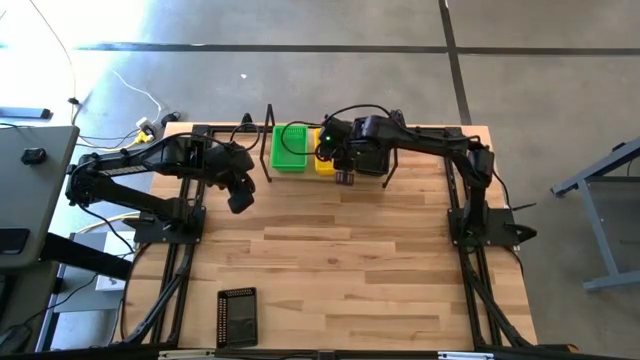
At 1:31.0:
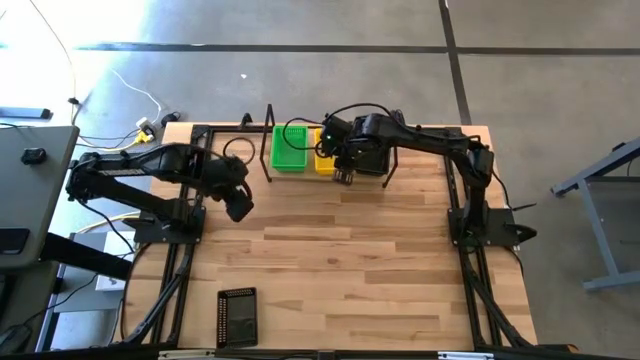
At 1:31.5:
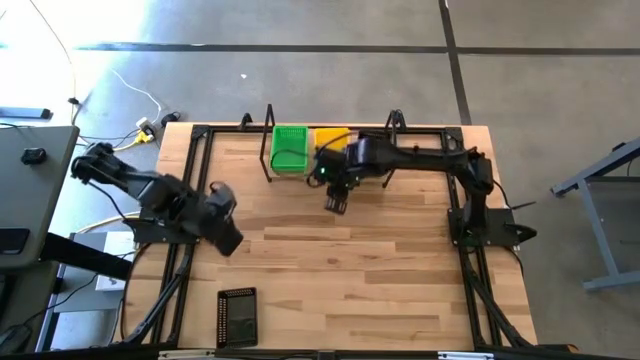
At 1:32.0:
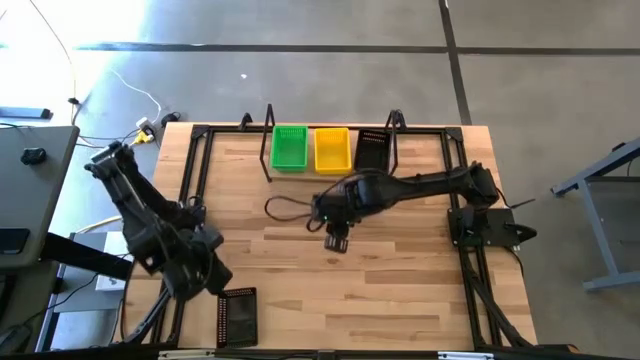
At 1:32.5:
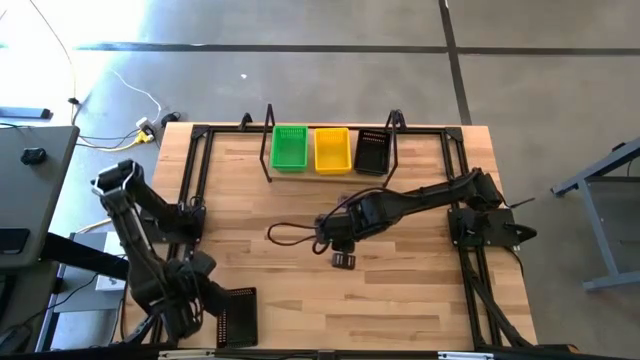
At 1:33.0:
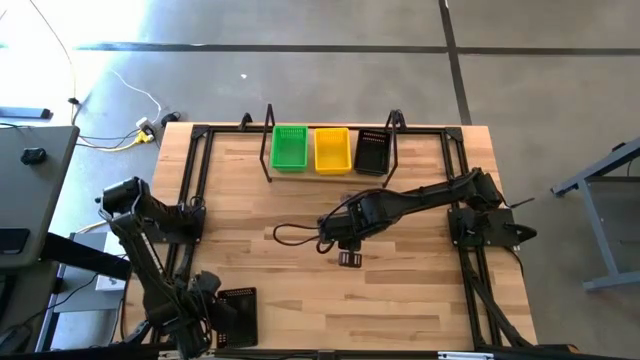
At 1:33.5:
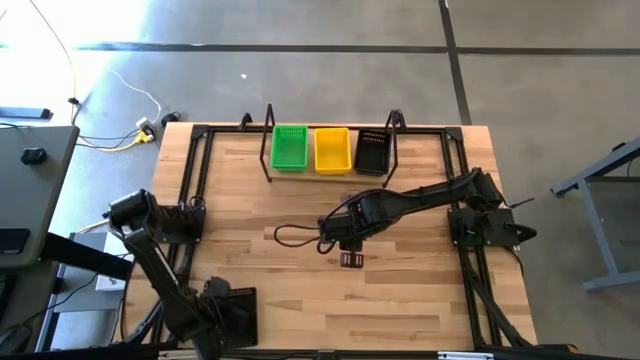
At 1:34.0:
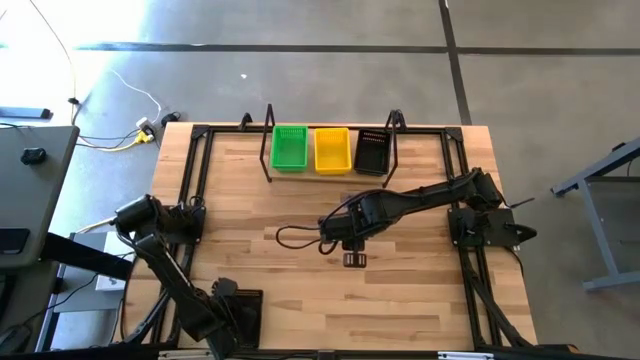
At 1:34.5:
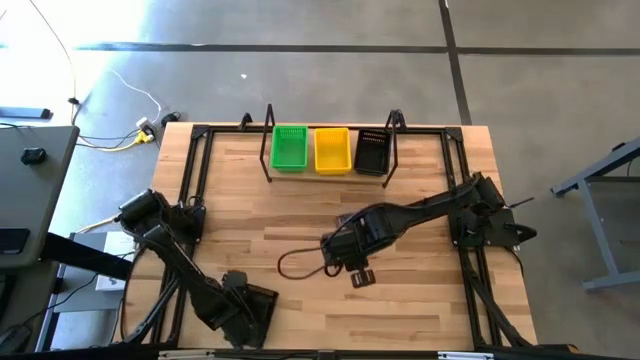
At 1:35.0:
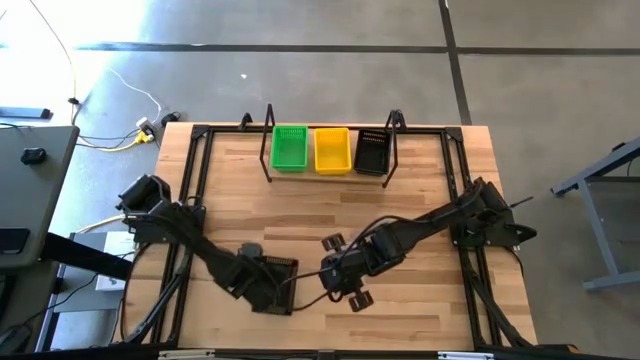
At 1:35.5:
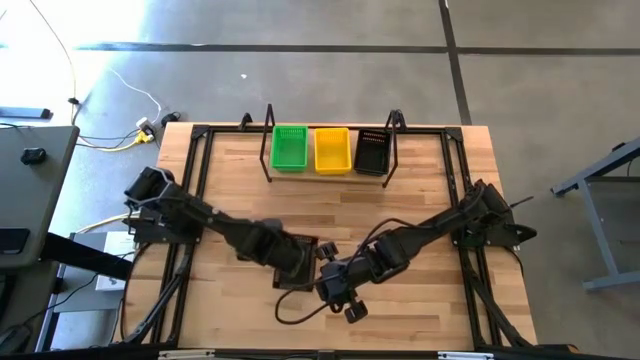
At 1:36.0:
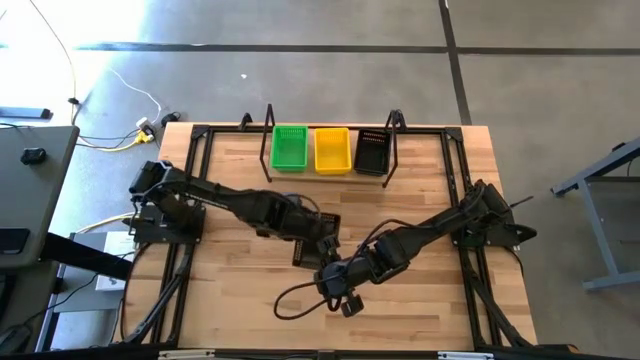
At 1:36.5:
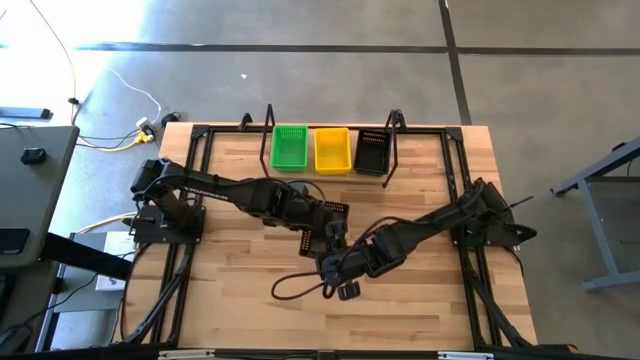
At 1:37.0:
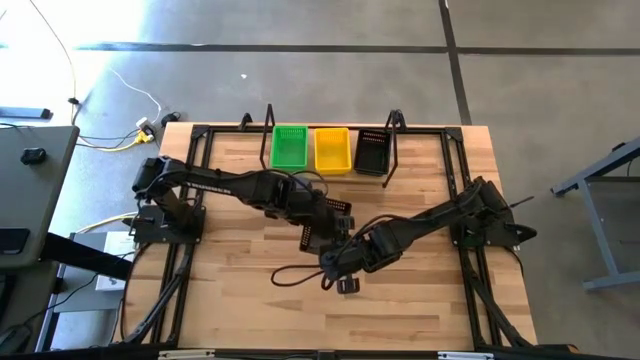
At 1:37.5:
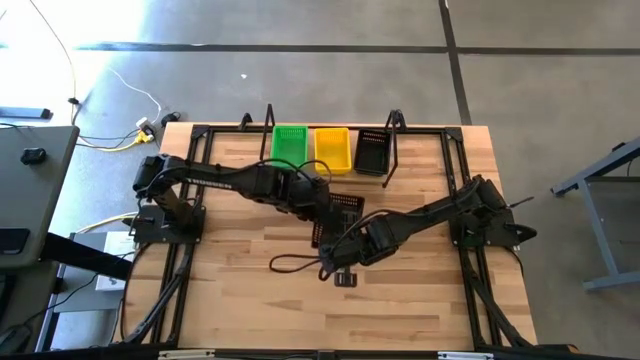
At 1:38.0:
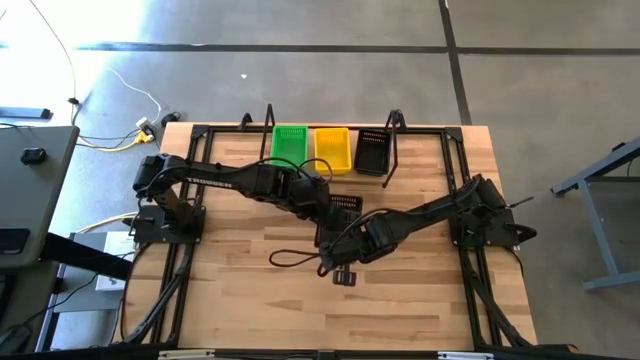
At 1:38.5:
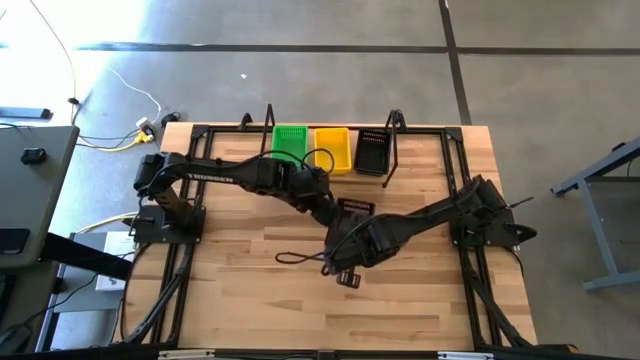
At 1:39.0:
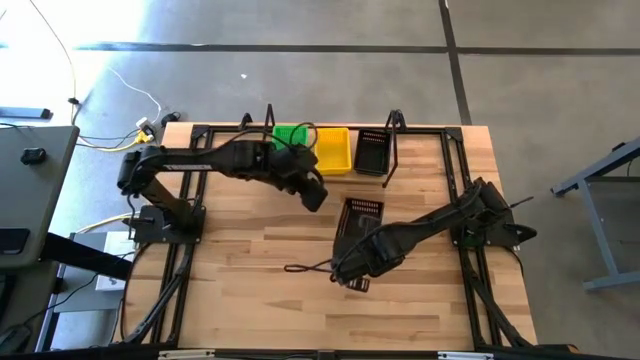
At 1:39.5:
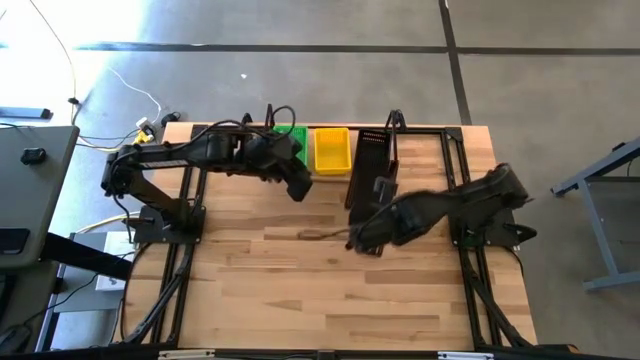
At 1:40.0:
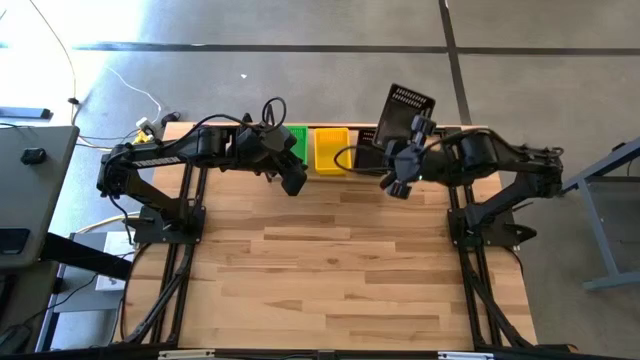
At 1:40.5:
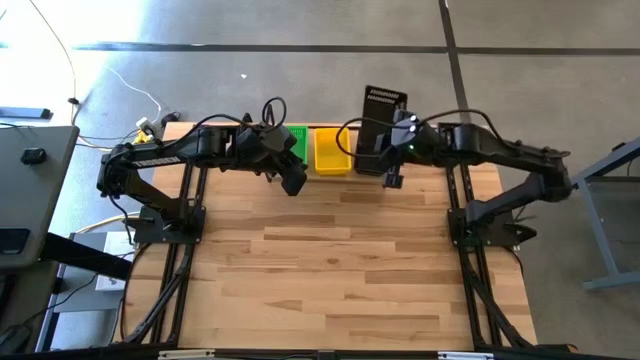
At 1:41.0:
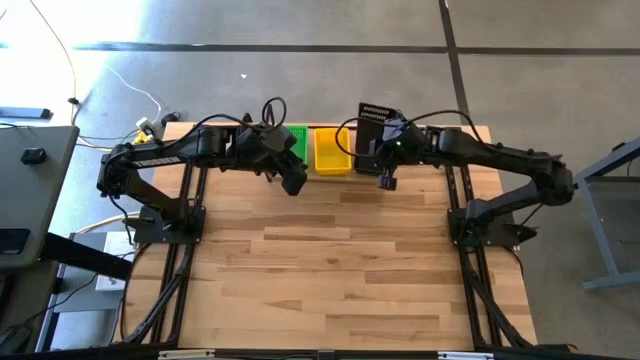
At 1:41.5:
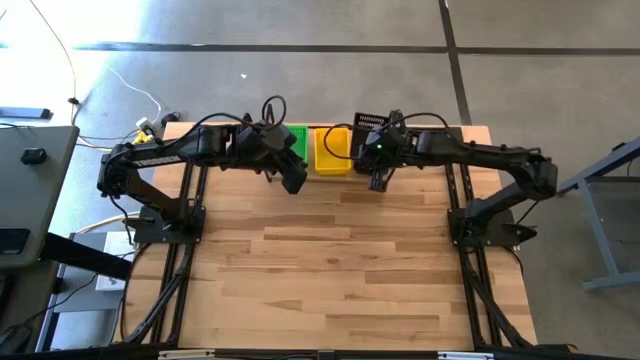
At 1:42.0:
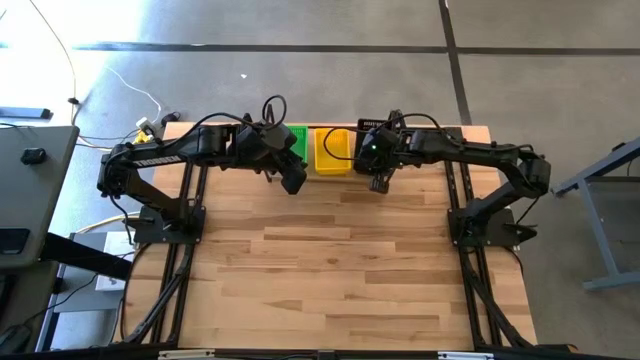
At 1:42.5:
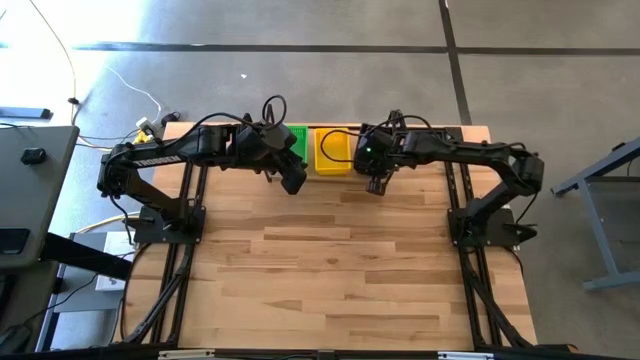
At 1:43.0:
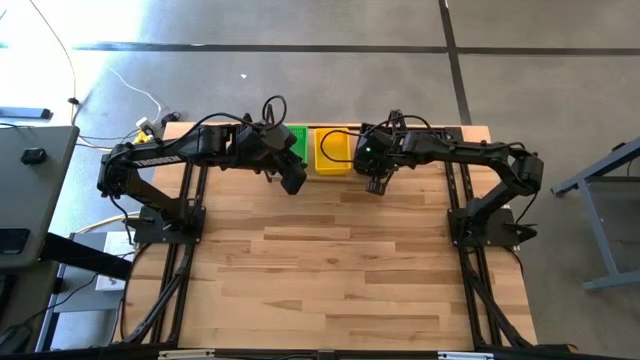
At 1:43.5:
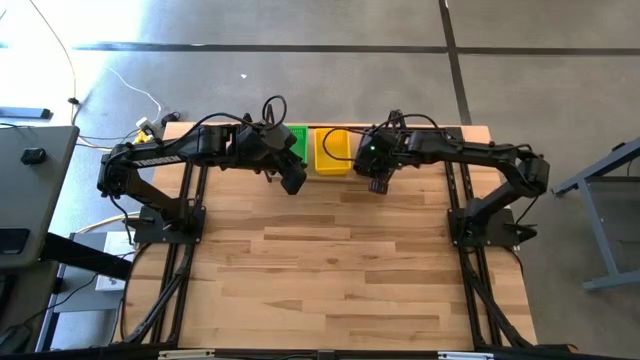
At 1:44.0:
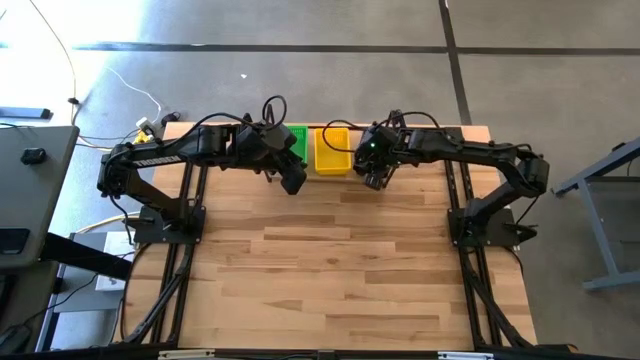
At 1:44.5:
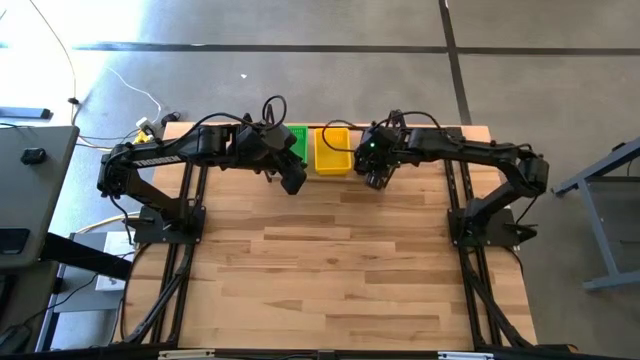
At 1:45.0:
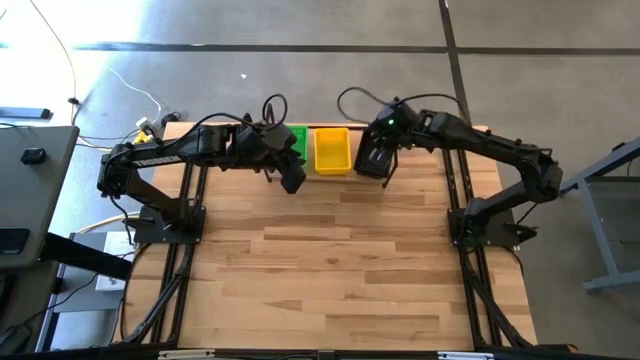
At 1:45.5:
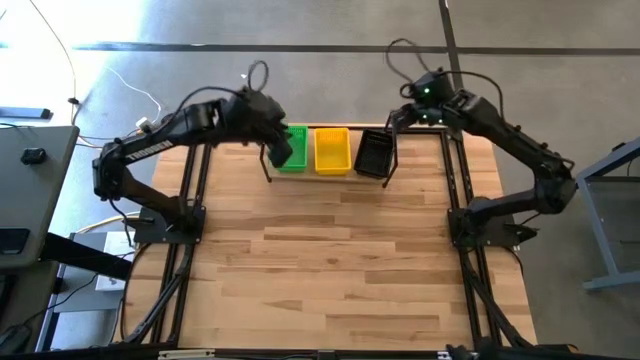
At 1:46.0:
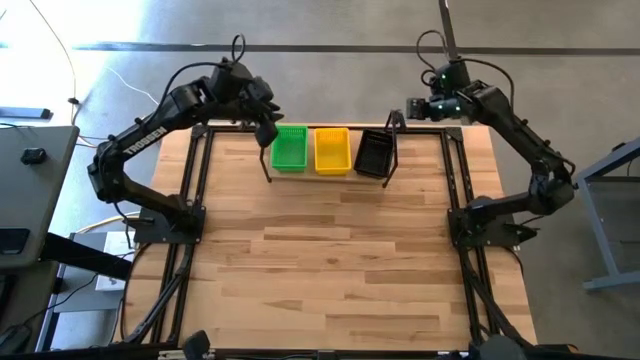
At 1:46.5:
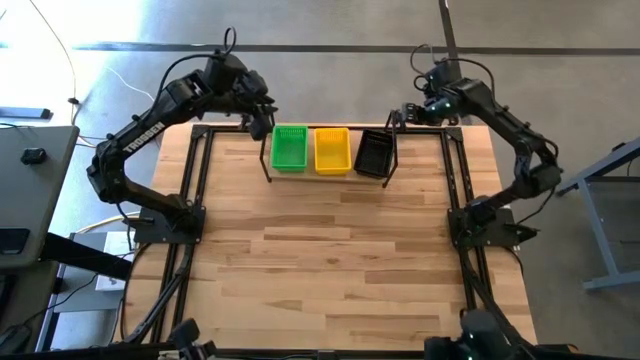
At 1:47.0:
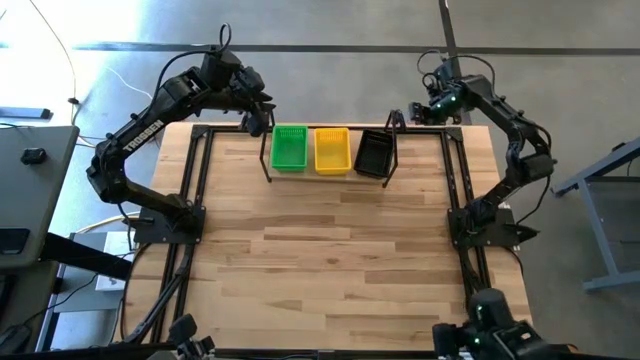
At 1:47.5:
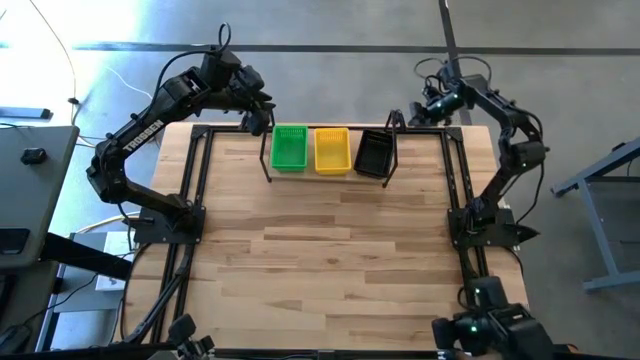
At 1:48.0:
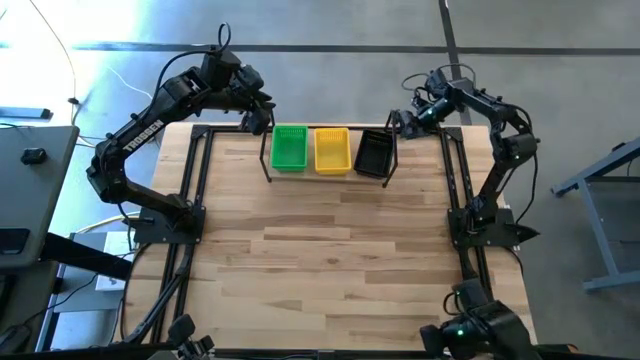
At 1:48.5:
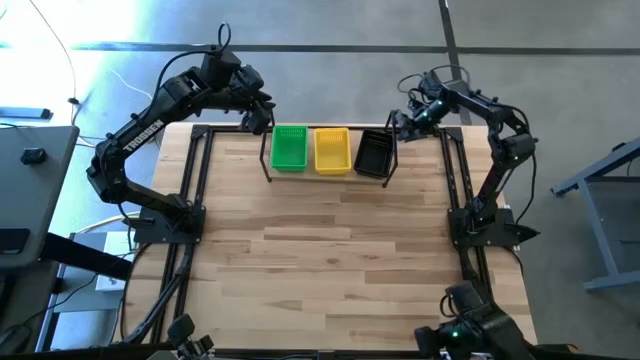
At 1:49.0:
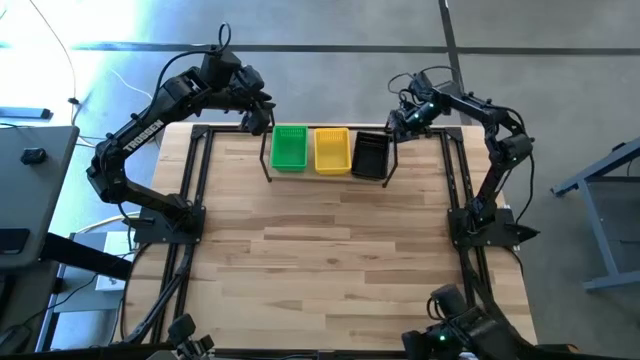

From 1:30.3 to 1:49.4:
Task: Stack baskets on shelf by color
Stack the black bin on top of the black bins on the shelf

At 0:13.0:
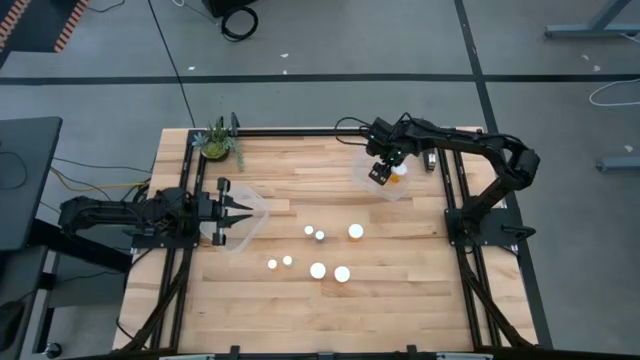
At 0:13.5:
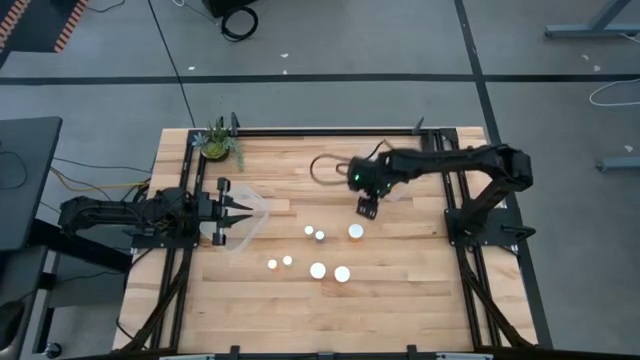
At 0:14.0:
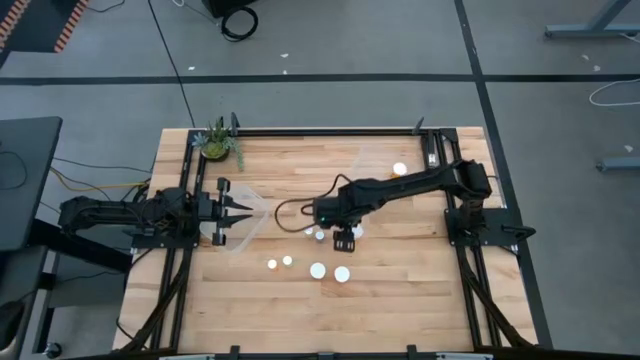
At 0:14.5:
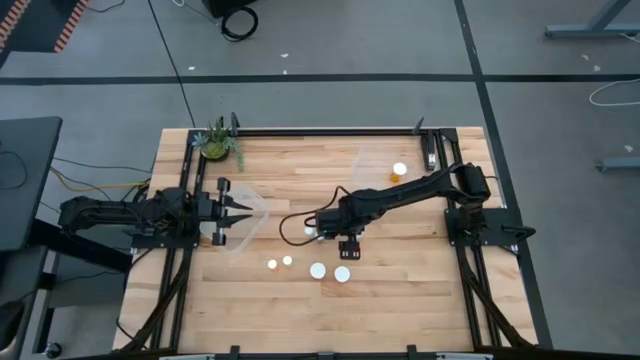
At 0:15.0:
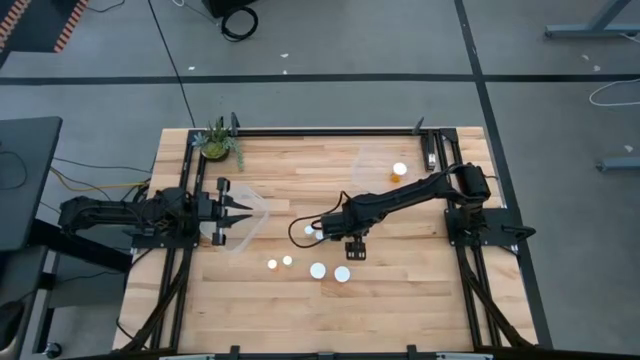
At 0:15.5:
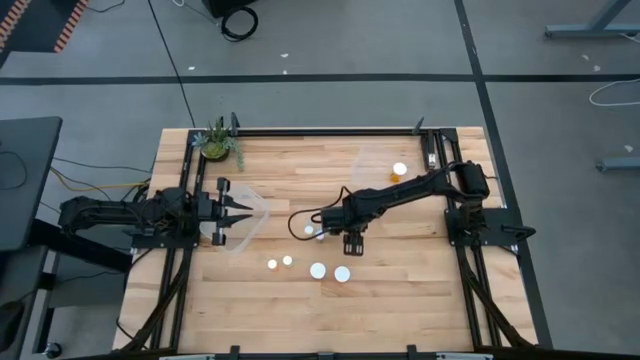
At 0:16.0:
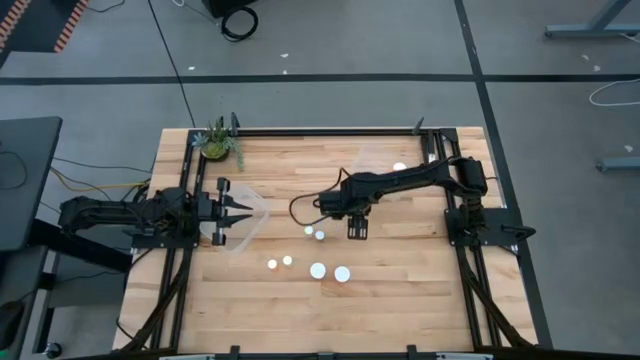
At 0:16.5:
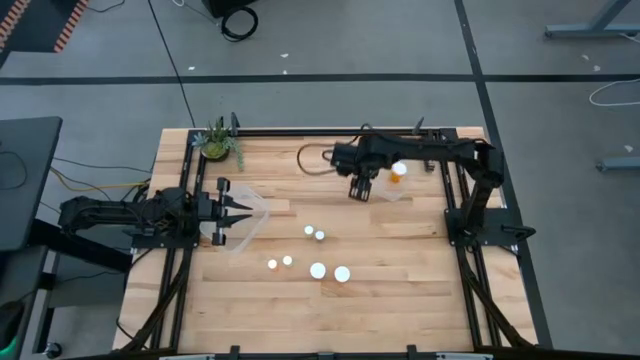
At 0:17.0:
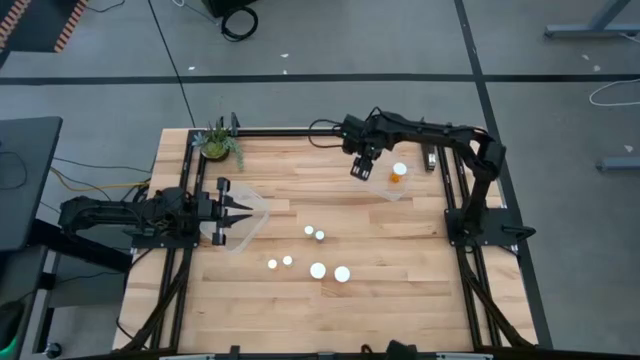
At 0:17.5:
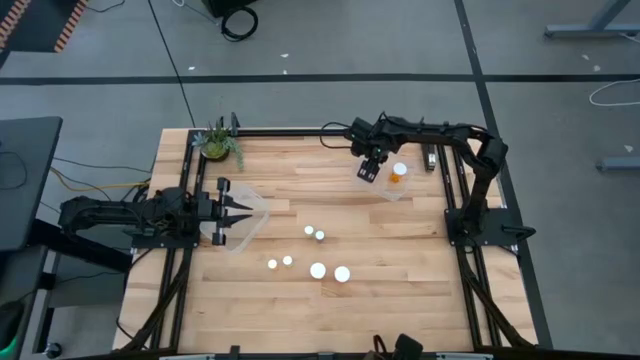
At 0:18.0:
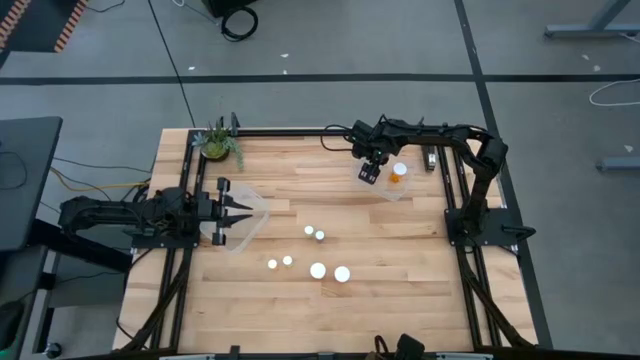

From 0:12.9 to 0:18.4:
Task: Pick and place medicine bottles into bin by pill shape (circle, oval)
Put the large orange pill bottle into the right transparent bin
